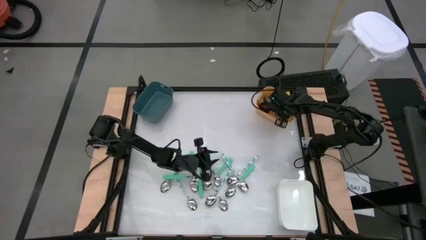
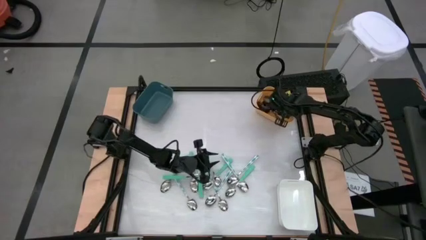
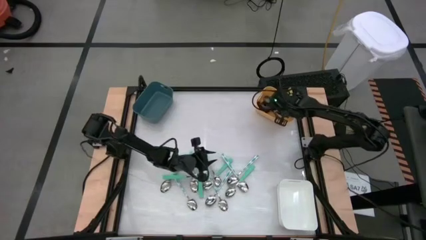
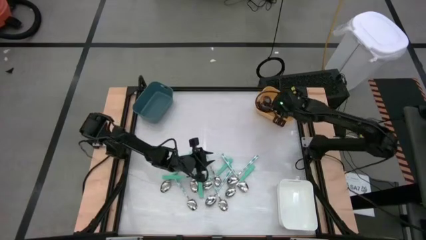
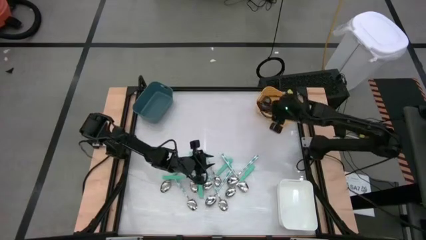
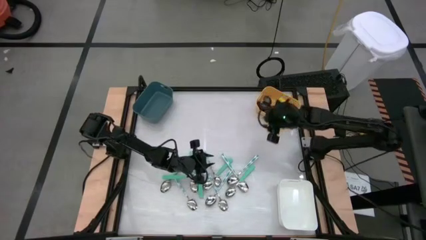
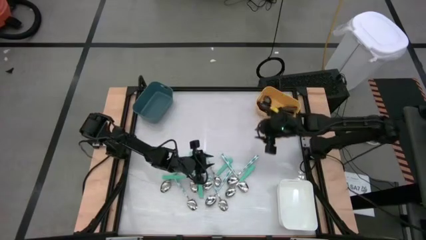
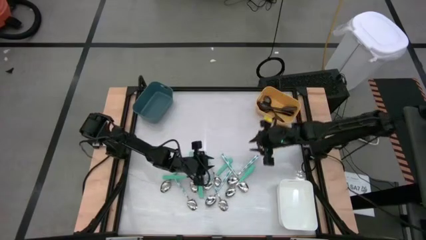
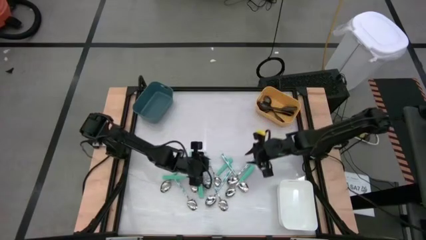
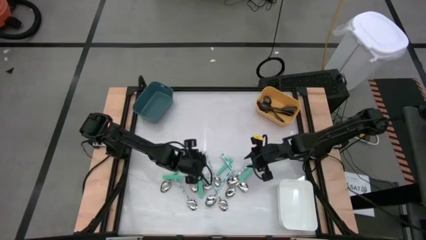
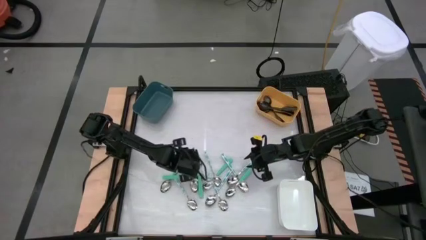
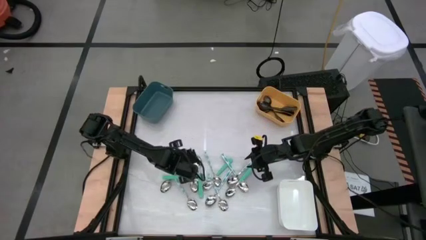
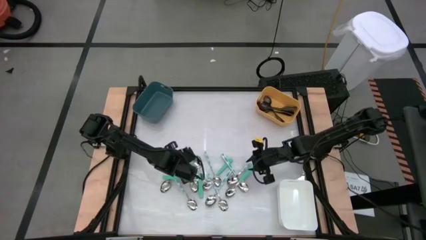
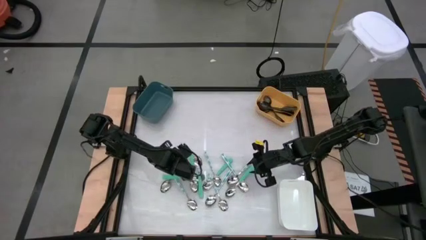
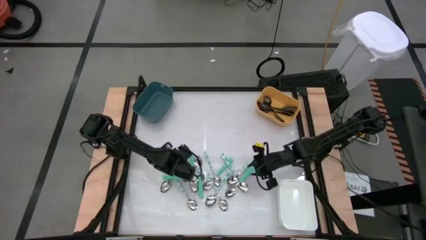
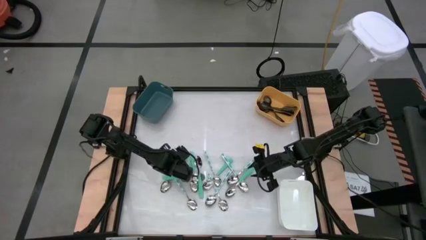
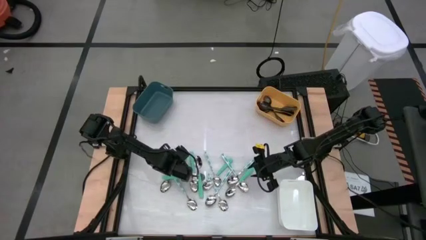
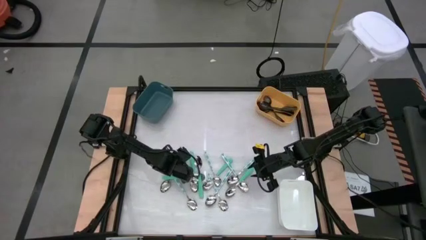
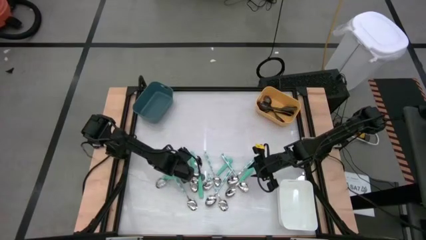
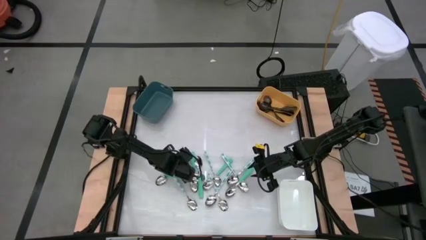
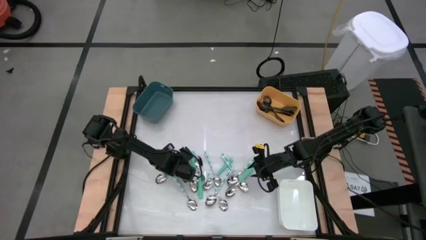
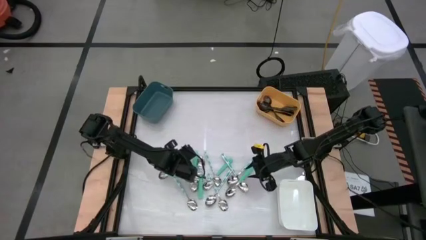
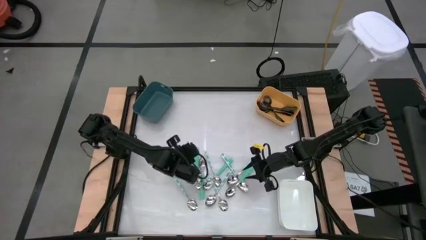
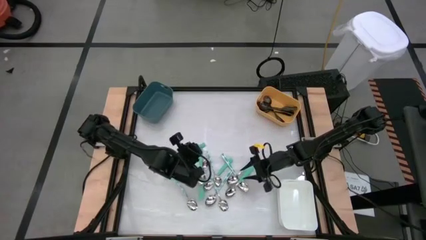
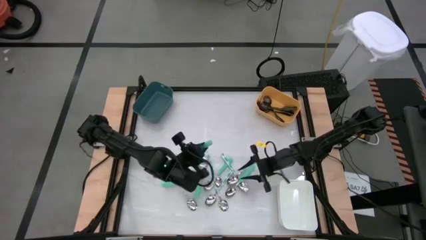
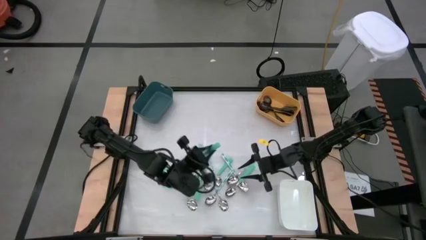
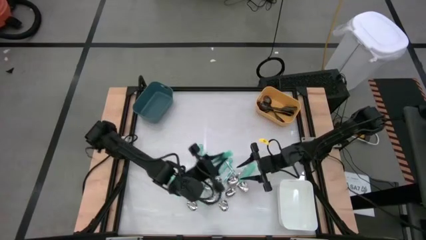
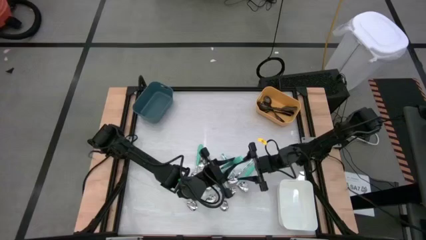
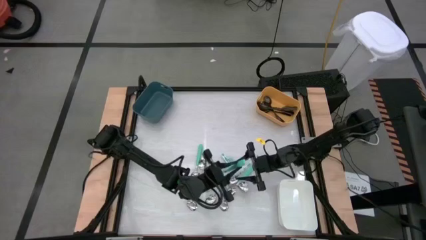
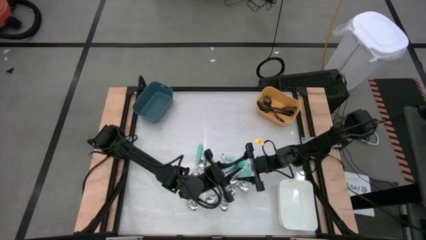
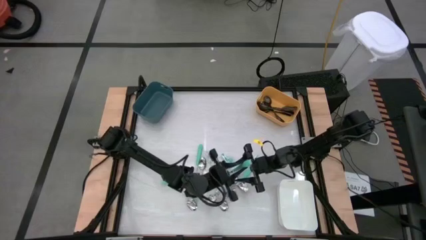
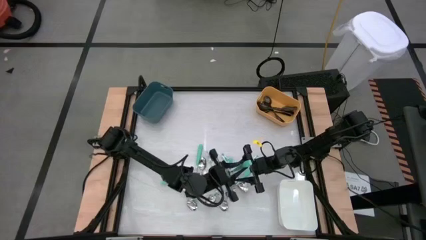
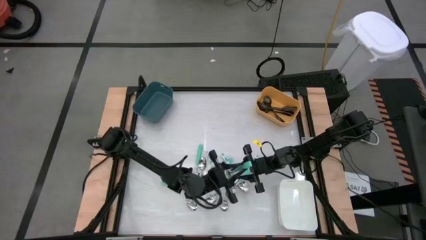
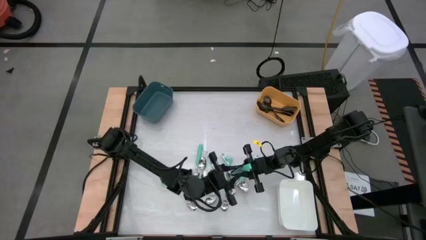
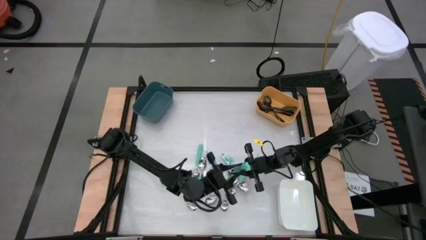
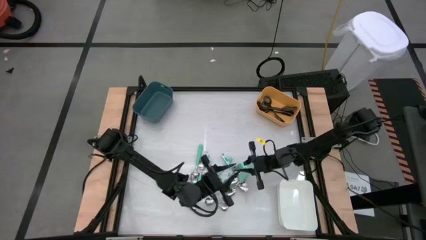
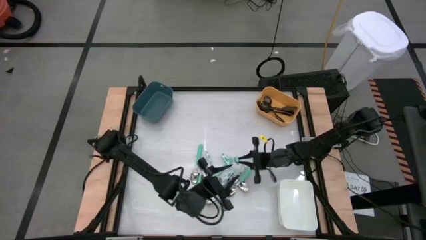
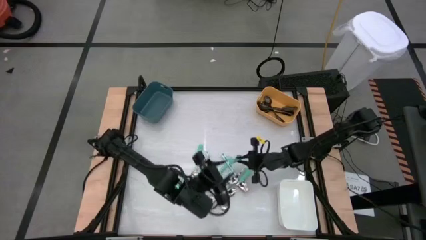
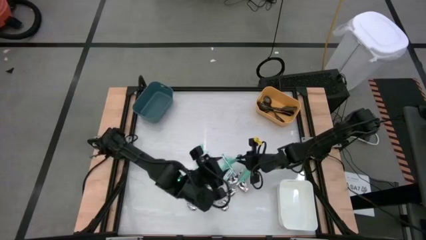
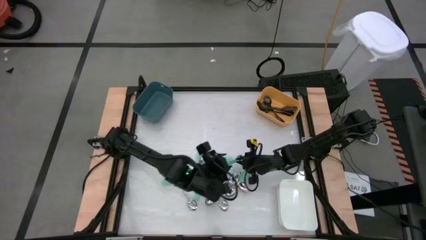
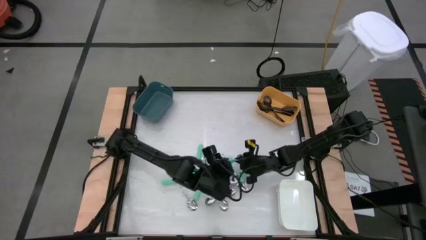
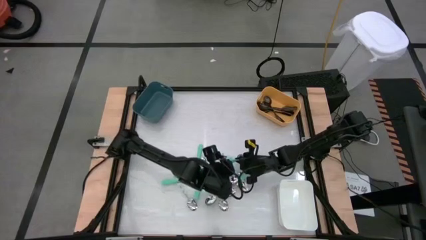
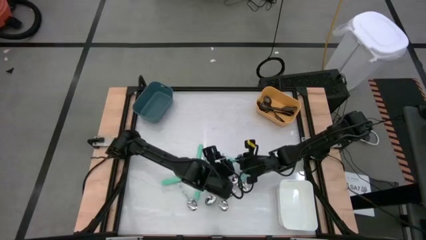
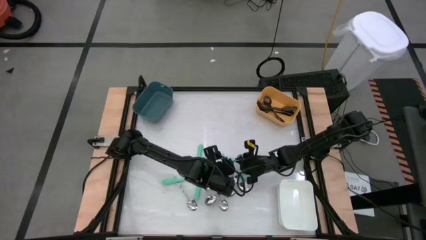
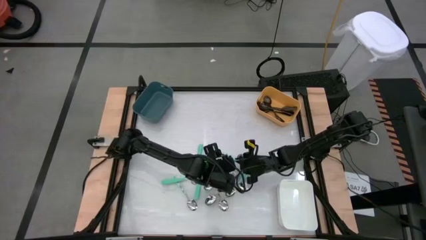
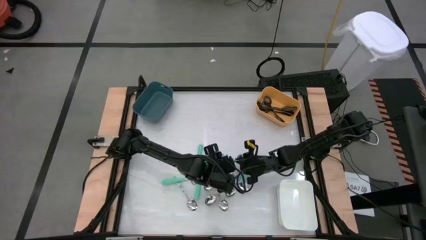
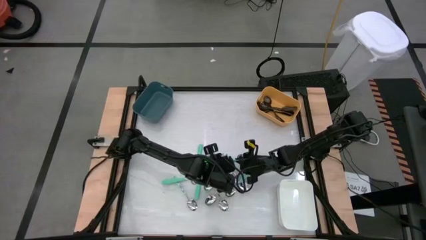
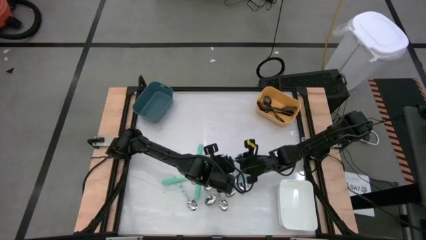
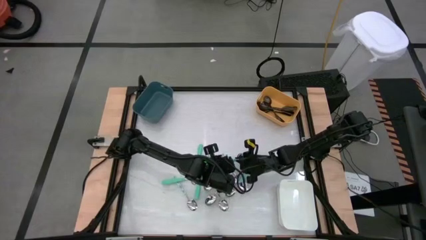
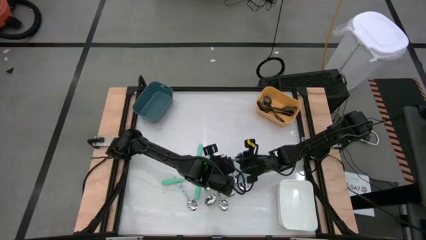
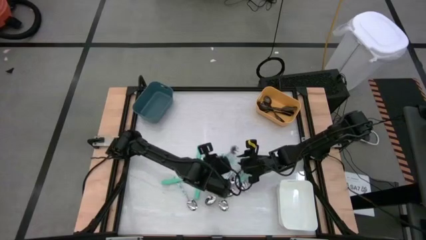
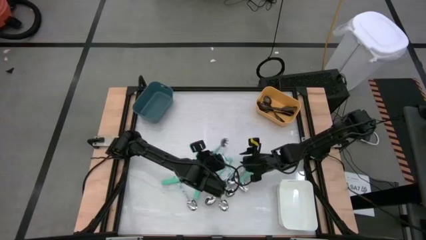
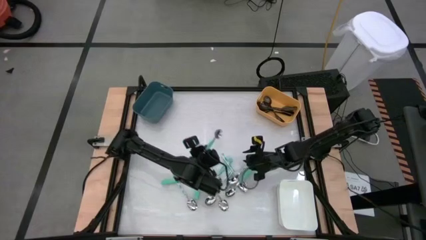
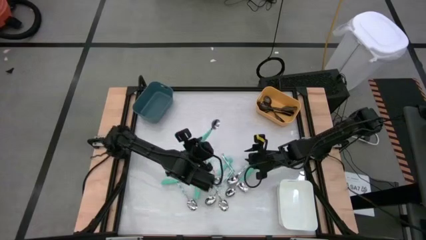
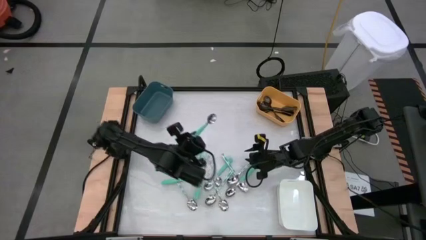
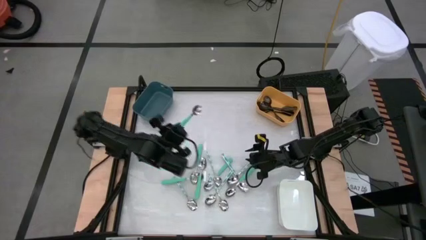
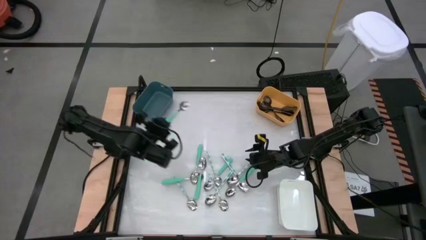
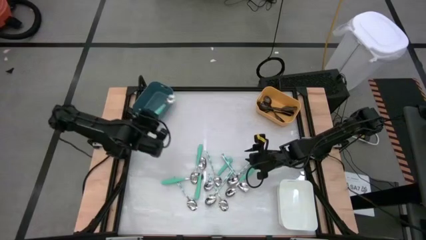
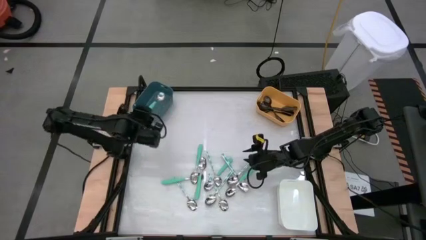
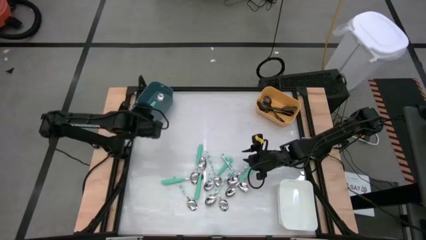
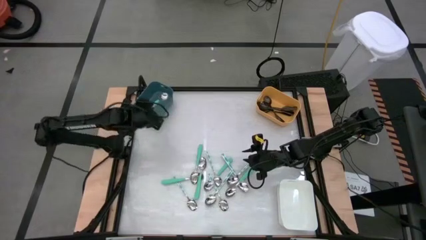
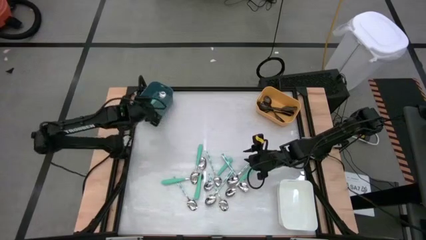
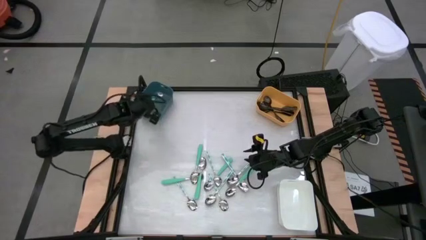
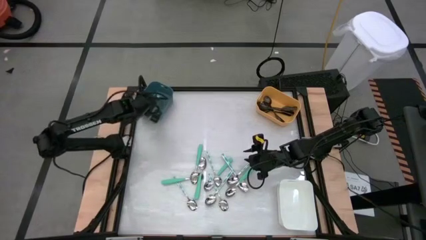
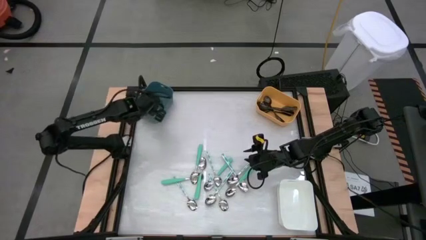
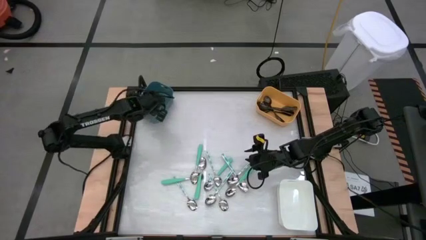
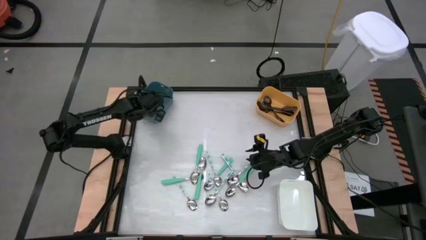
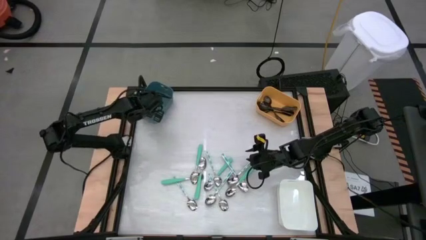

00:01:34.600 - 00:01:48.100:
Task: Sort silverware by color (type)
Put the green spoon into the blue bin

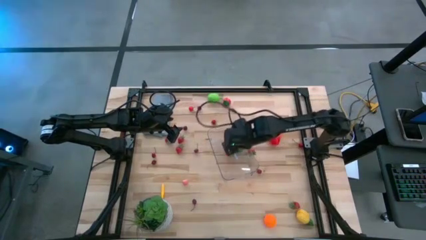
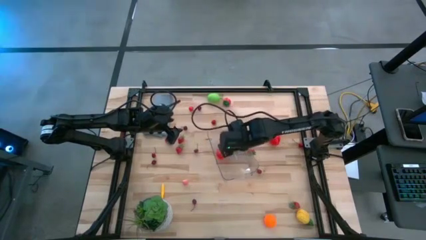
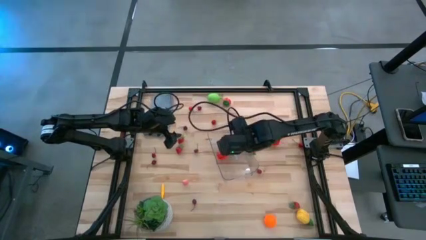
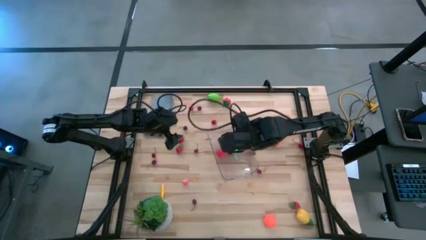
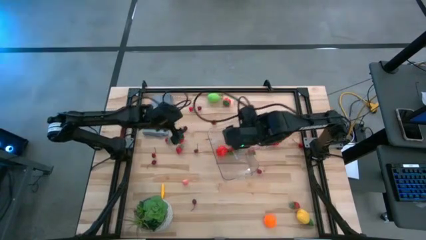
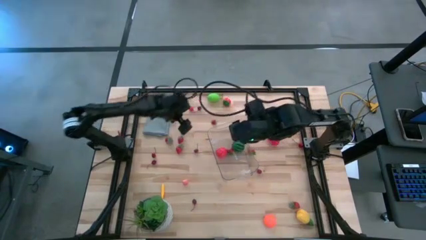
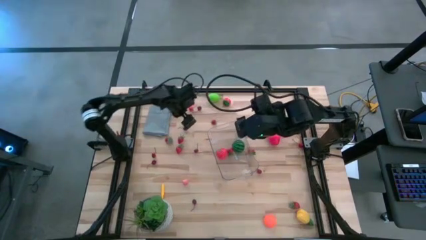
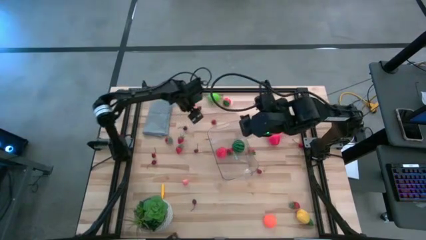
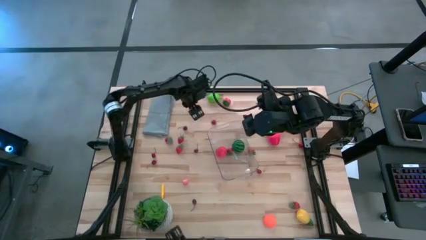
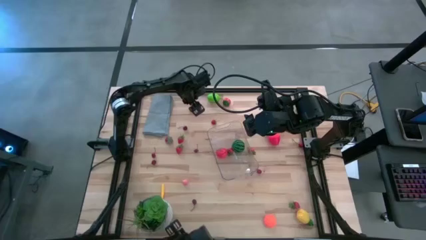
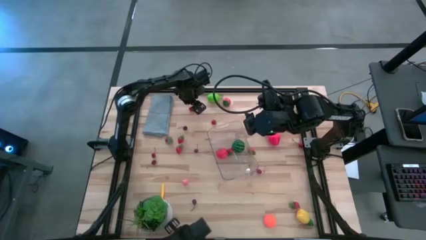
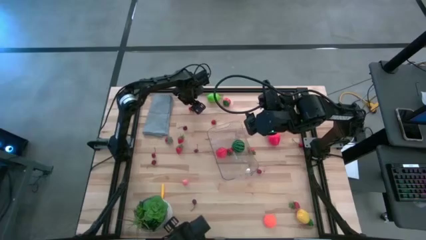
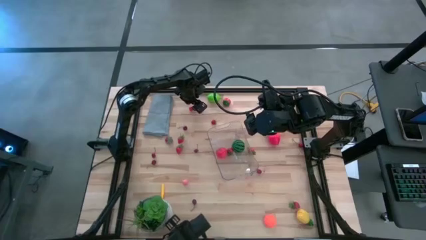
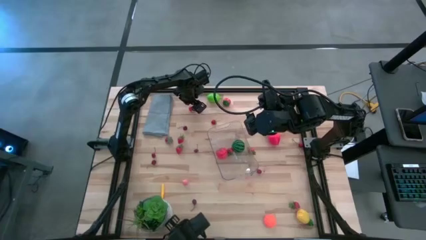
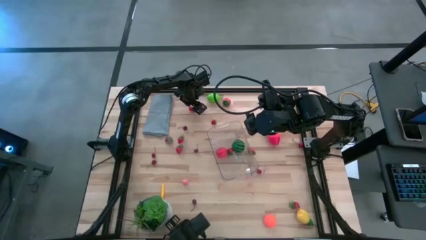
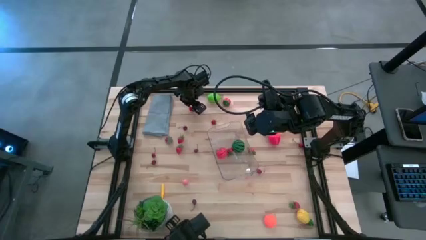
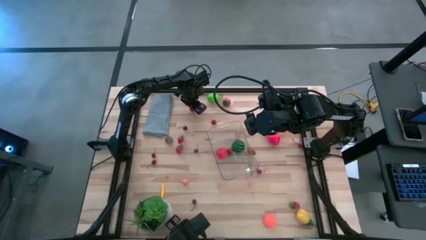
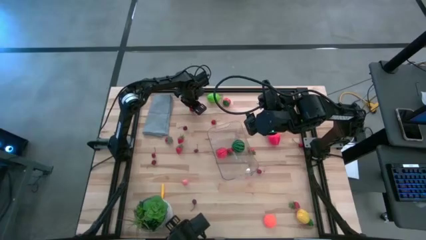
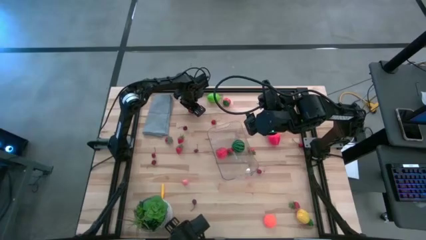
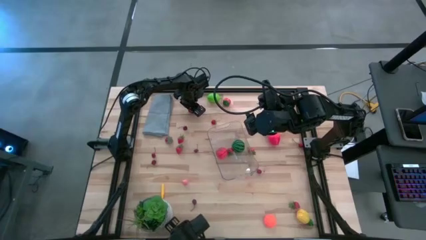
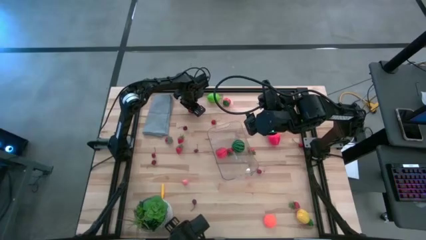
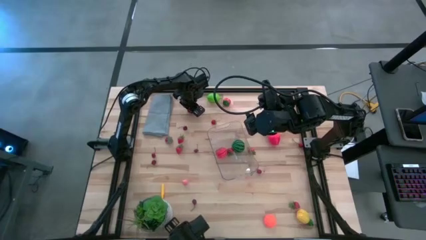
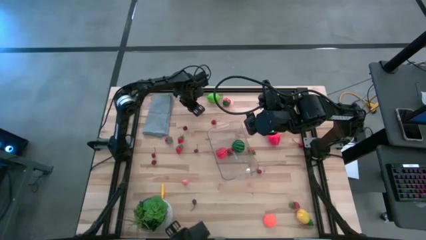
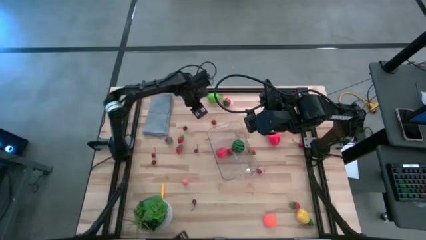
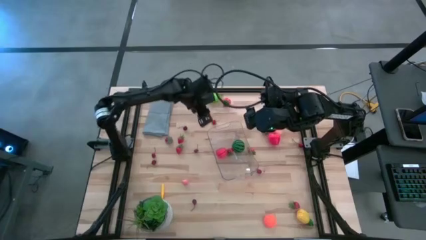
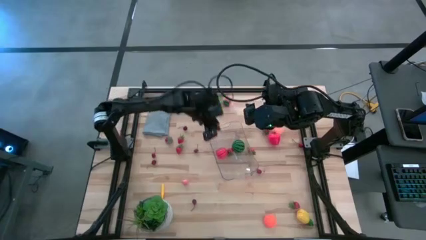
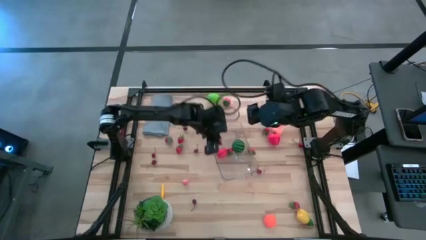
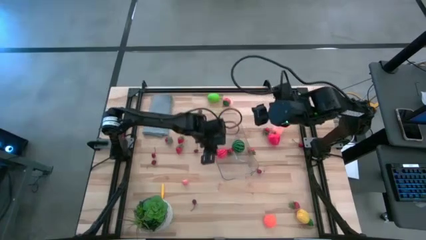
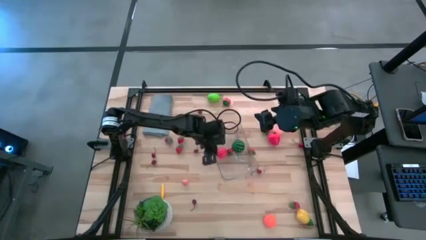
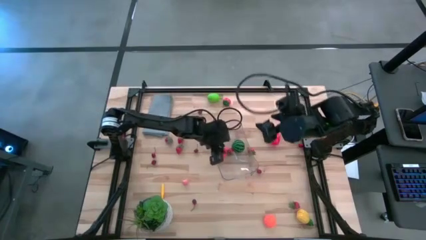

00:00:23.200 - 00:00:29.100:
Task: Pick and placing Produce into tupperware
Put the red cherry into the transparent bin
